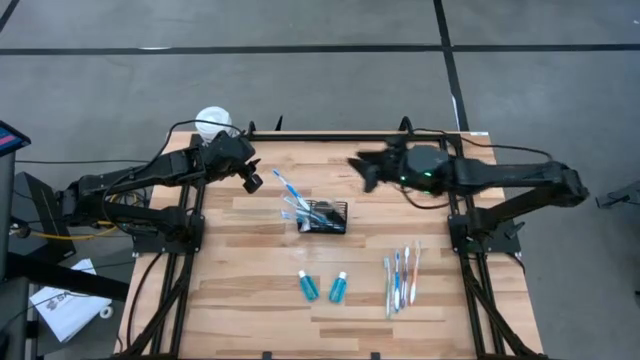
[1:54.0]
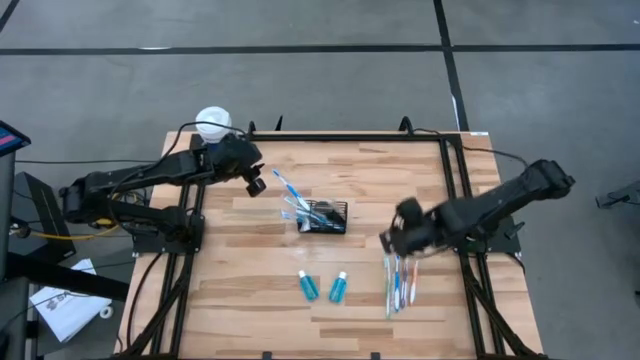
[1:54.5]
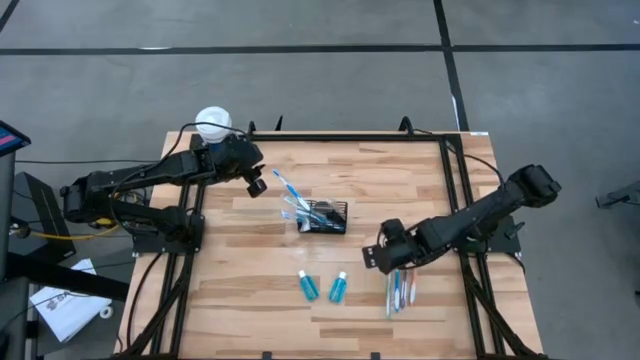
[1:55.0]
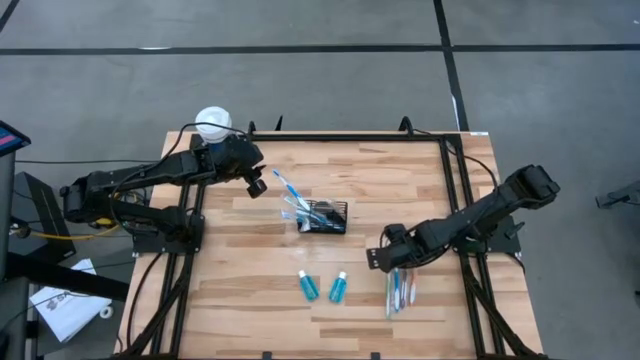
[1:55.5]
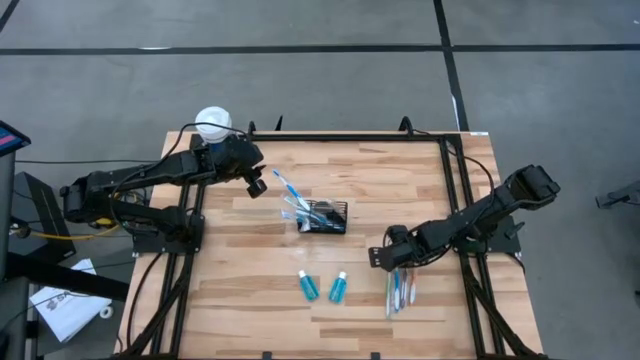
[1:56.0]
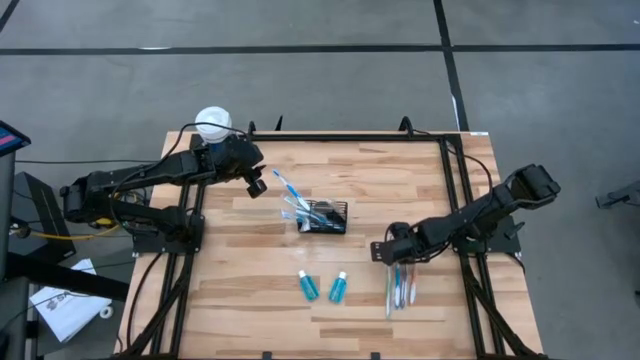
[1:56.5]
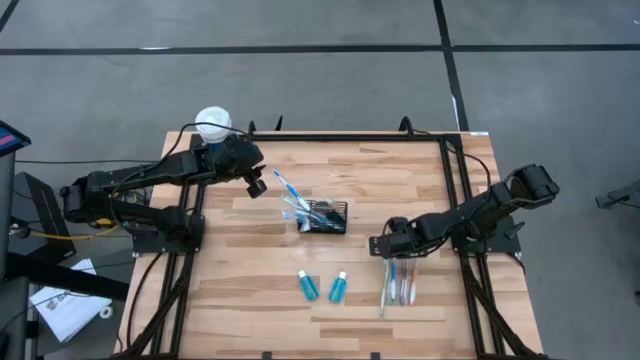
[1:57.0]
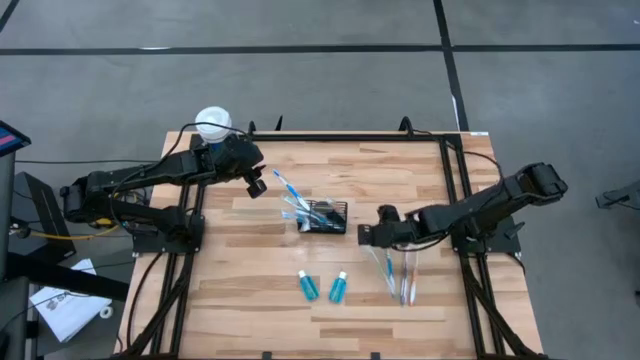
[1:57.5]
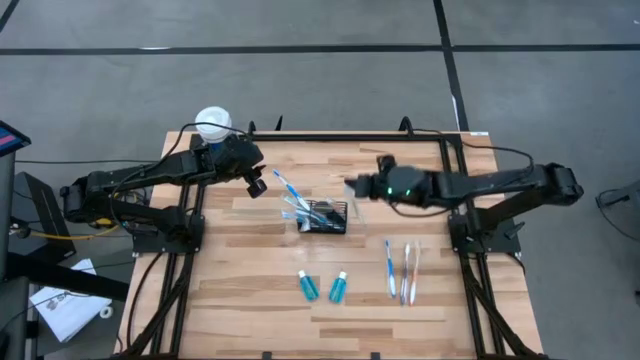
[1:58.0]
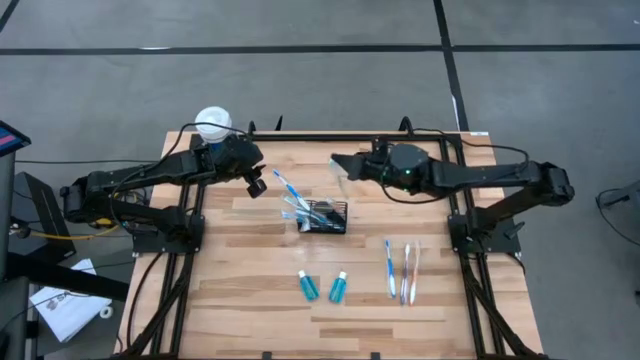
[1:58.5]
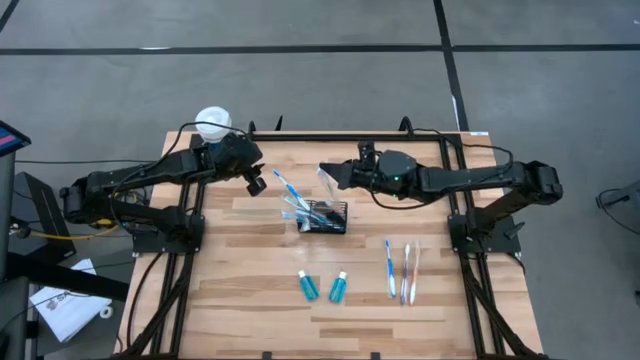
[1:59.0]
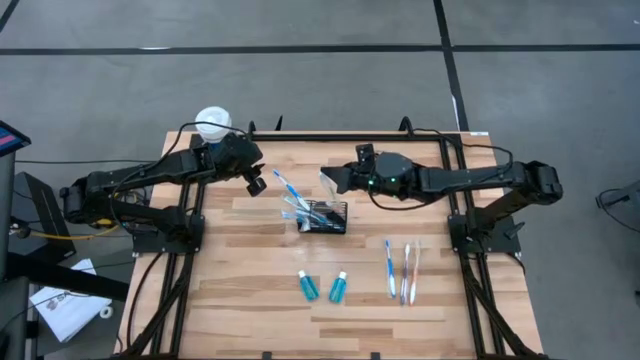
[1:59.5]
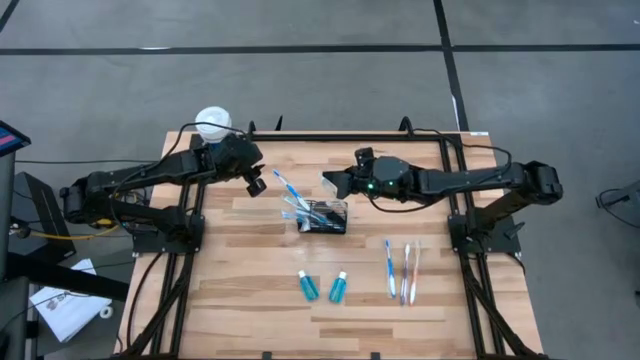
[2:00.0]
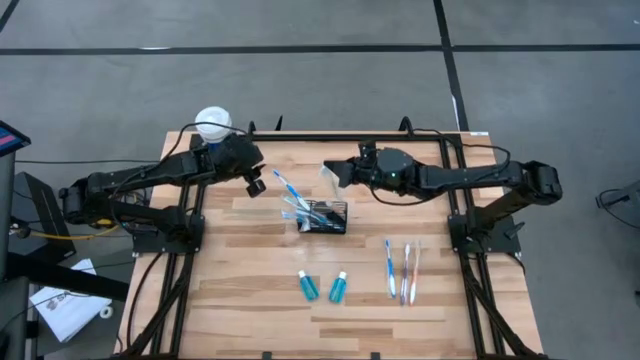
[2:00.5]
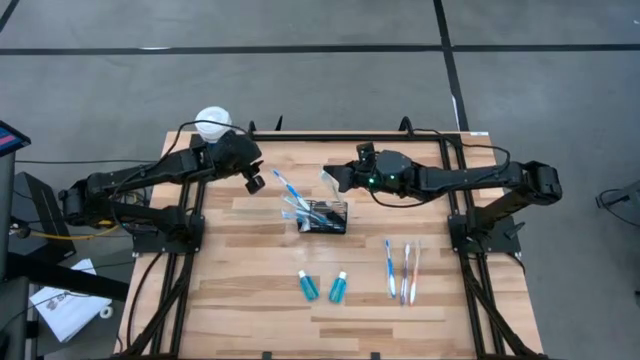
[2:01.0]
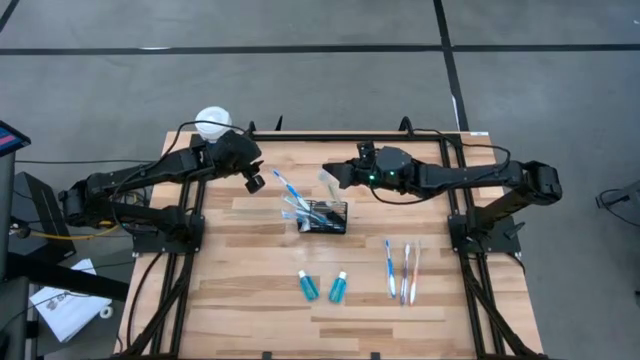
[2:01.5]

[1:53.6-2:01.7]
Task: Pick & Place toothbrushing station
Put the green toothbrush into the mesh

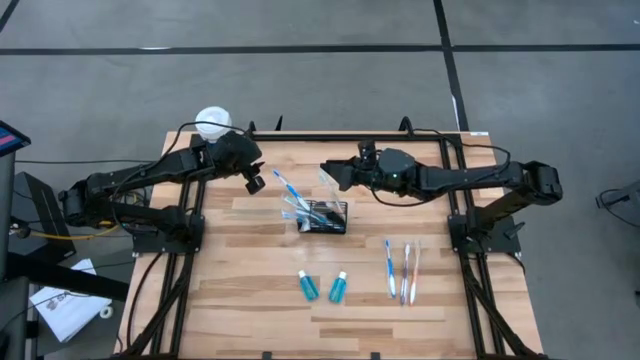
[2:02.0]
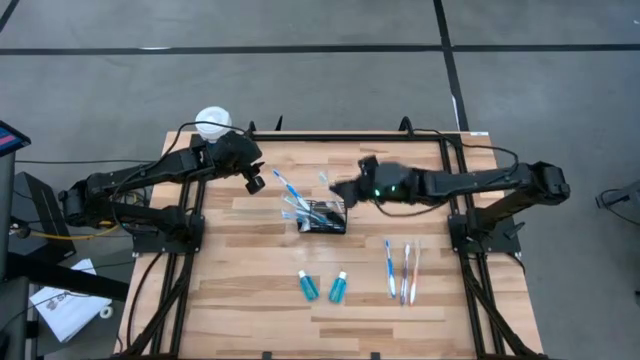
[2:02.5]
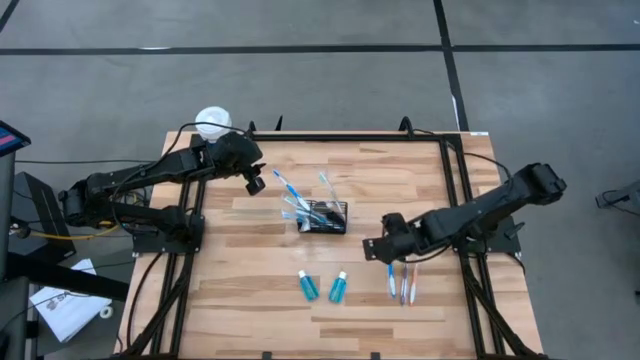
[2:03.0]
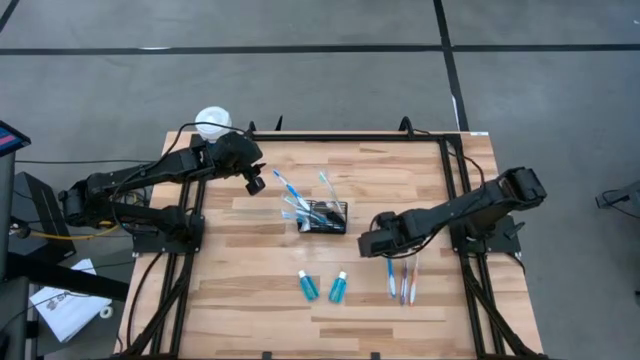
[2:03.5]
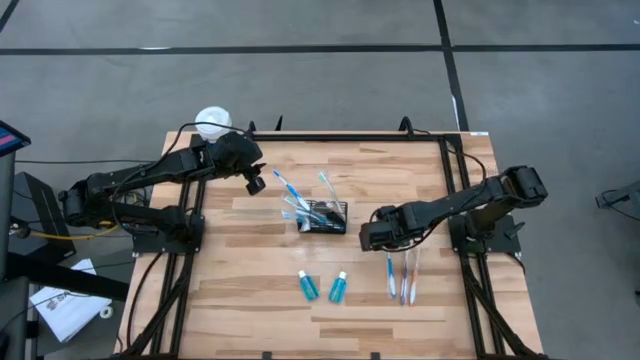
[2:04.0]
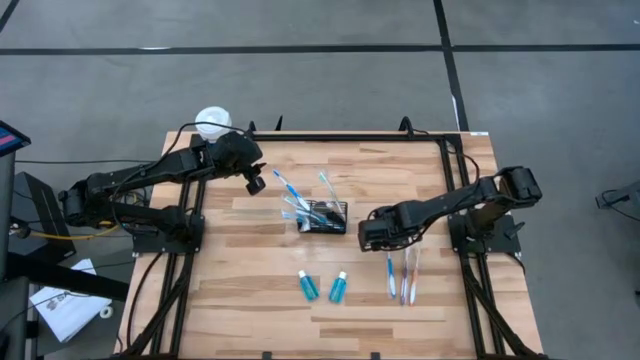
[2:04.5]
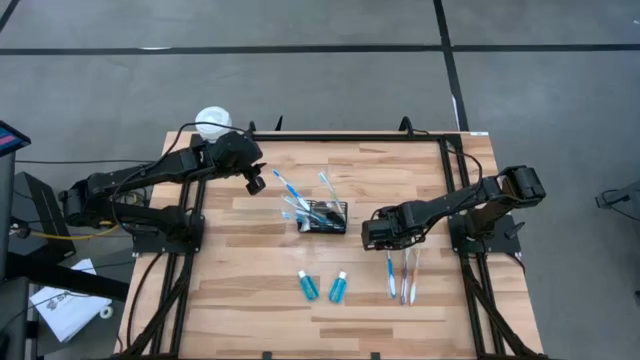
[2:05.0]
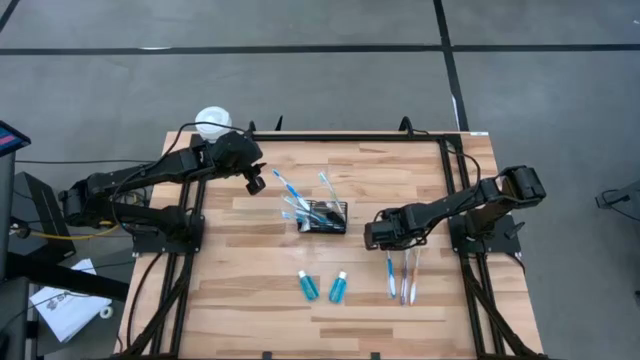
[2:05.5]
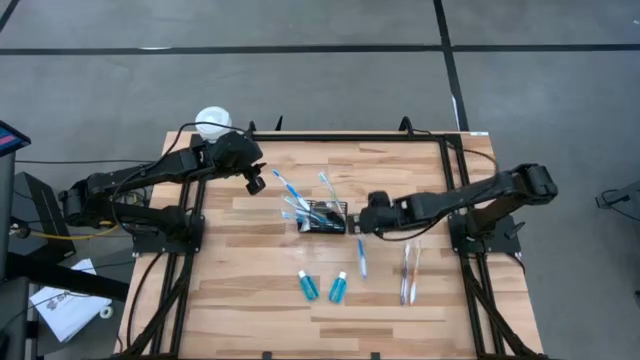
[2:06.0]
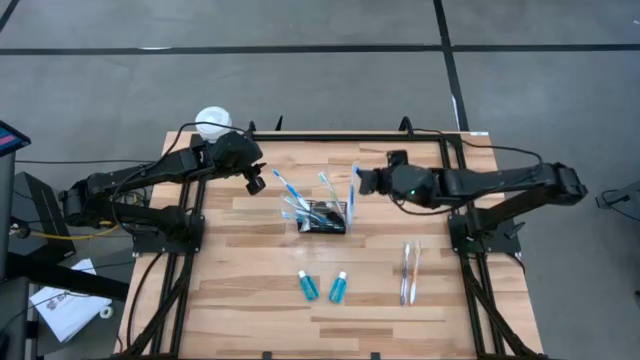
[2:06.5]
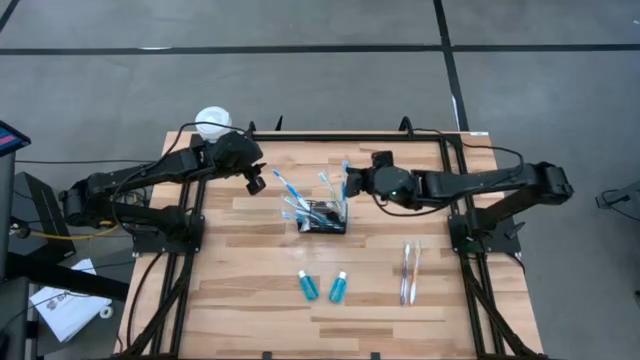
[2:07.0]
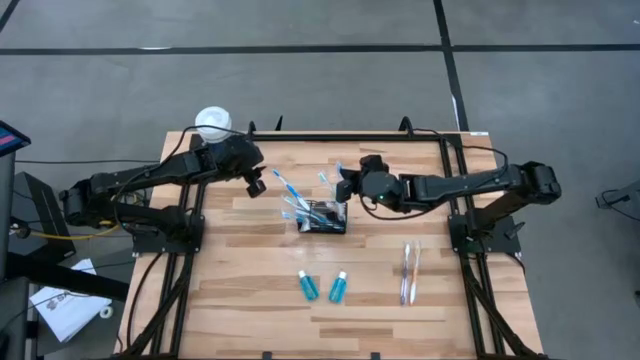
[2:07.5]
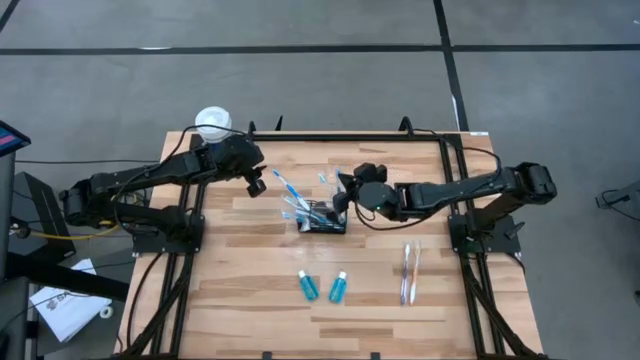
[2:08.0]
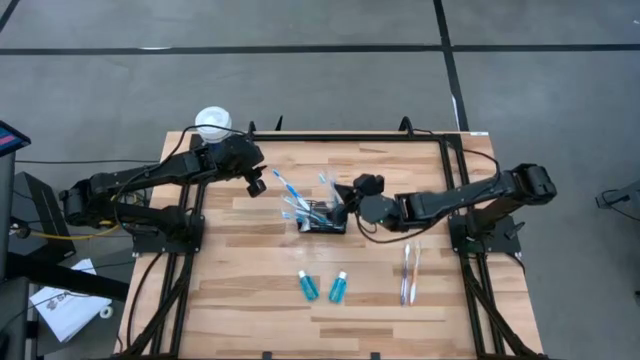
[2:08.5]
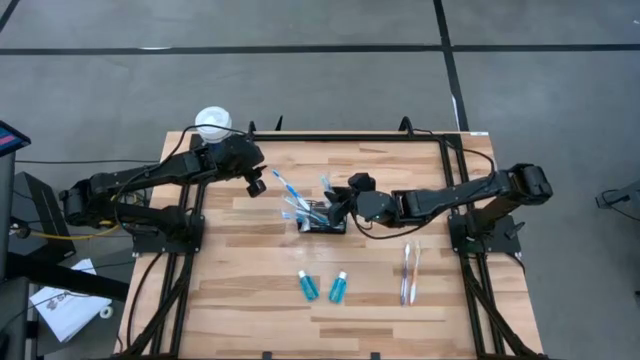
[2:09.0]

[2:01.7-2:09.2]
Put the blue toothbrush into the mesh

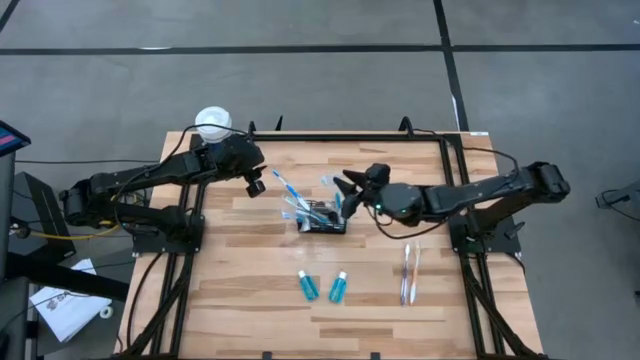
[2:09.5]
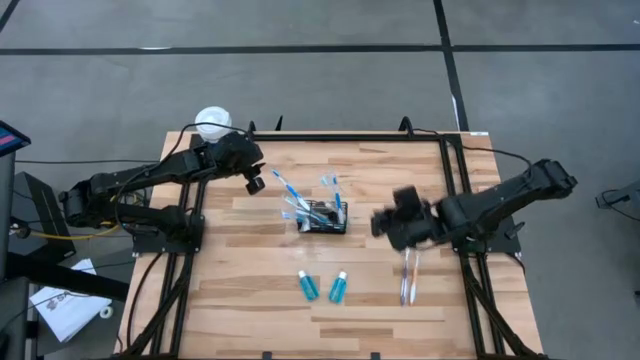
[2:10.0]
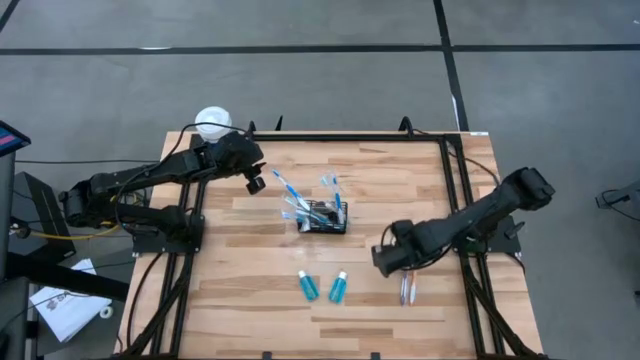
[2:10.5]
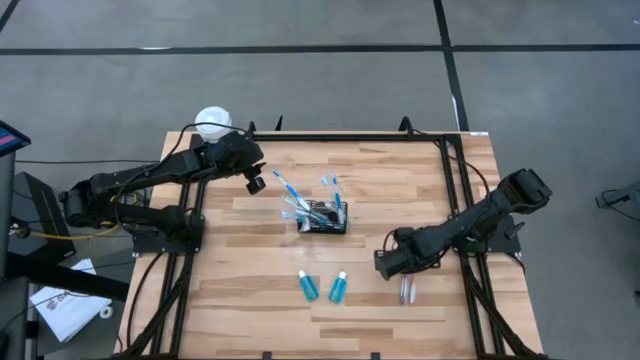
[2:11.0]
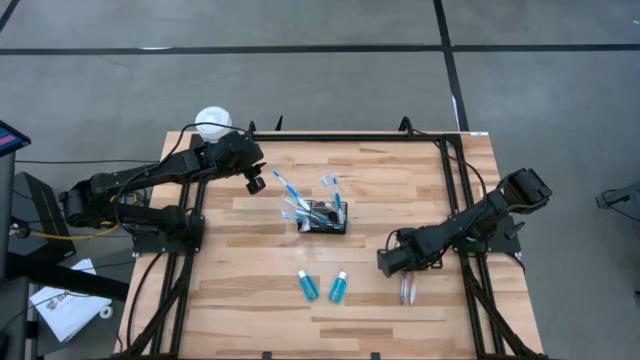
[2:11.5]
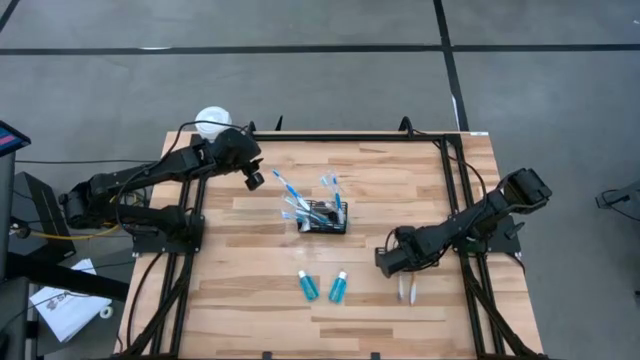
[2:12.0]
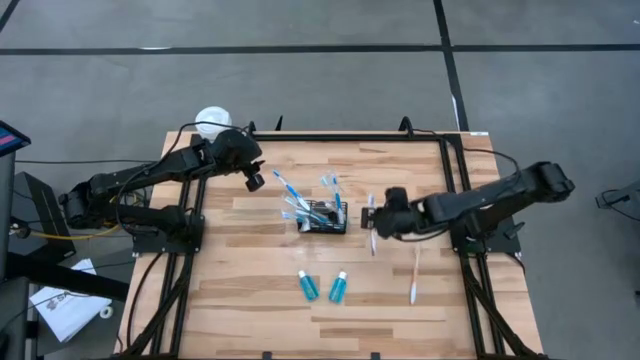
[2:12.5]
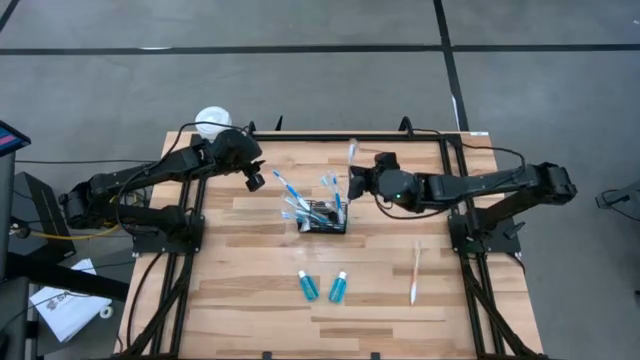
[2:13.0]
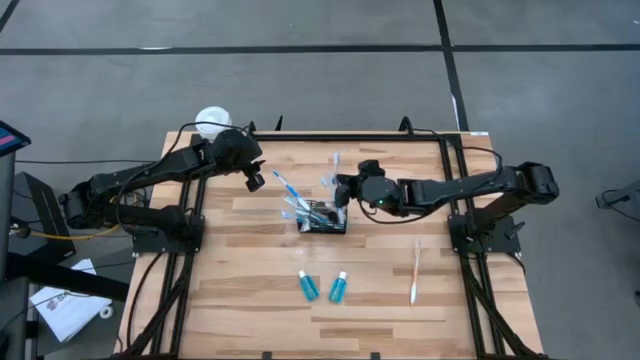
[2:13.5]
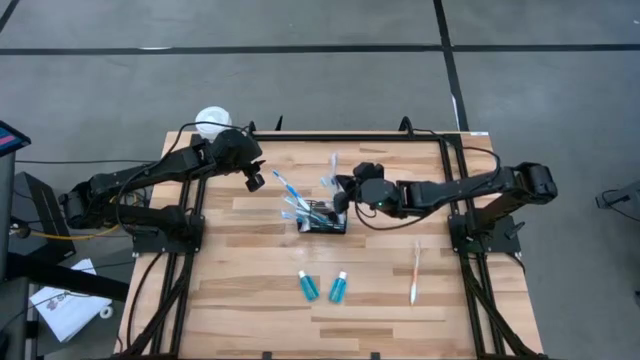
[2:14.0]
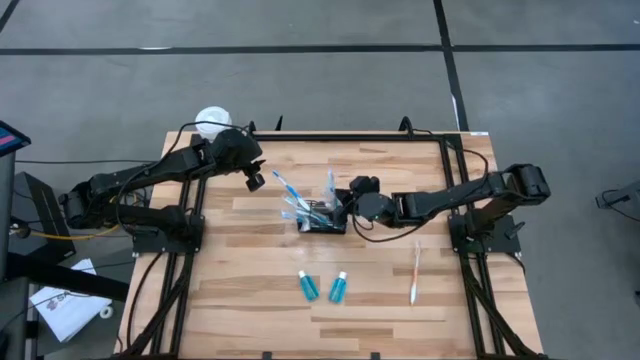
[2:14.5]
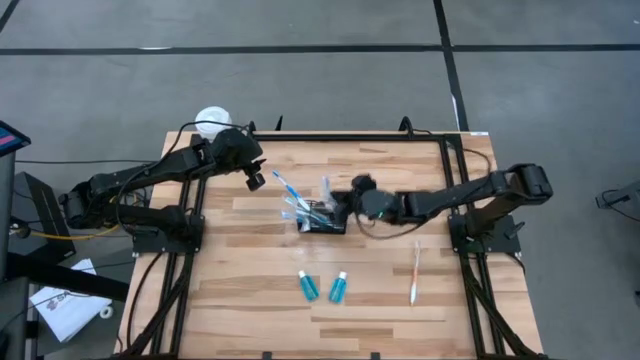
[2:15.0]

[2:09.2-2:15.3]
Put the purple toothbrush into the mesh
